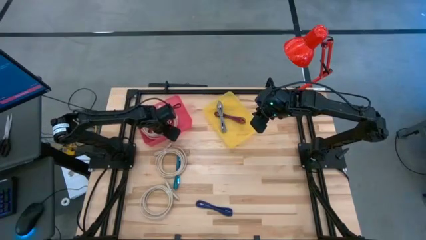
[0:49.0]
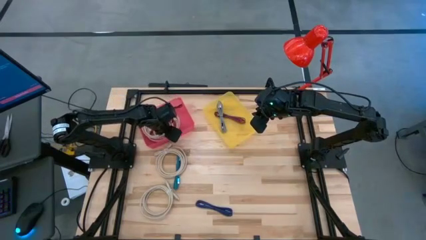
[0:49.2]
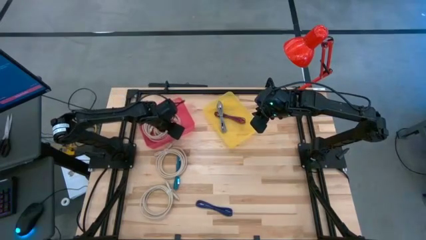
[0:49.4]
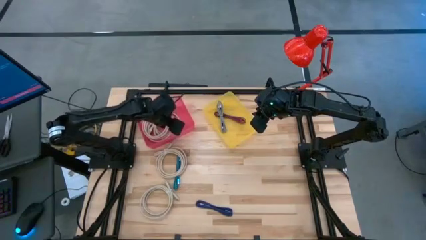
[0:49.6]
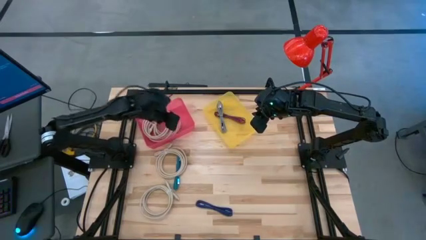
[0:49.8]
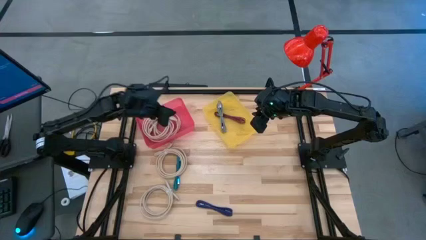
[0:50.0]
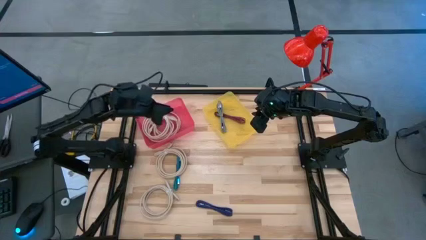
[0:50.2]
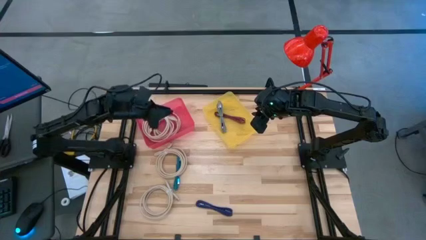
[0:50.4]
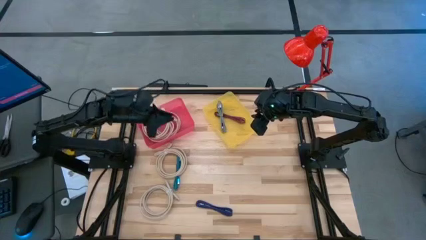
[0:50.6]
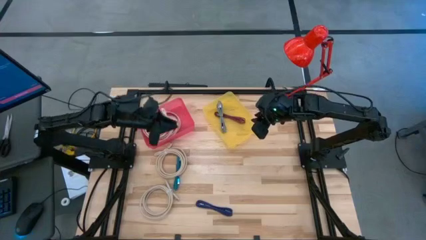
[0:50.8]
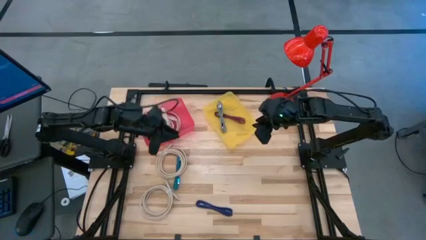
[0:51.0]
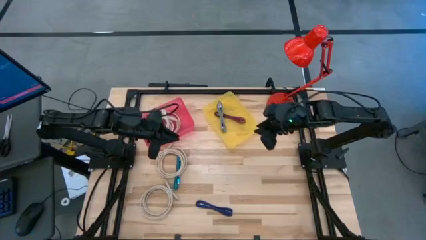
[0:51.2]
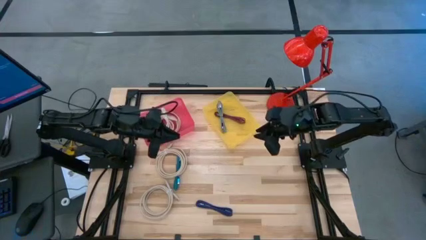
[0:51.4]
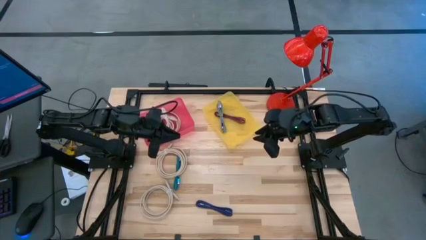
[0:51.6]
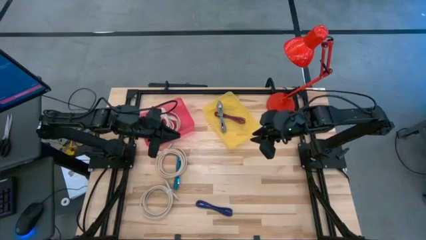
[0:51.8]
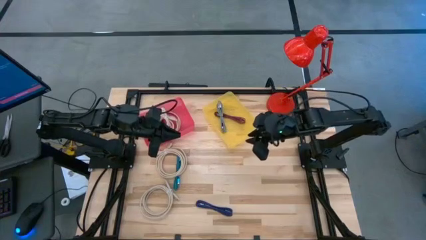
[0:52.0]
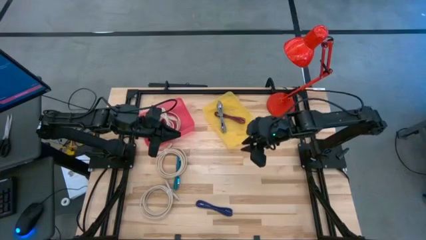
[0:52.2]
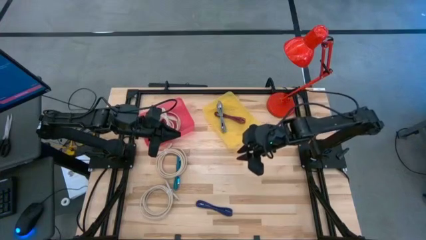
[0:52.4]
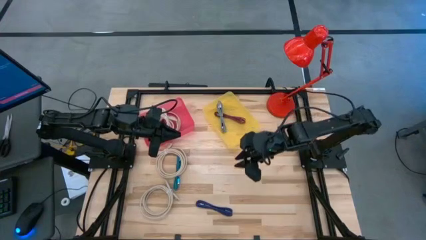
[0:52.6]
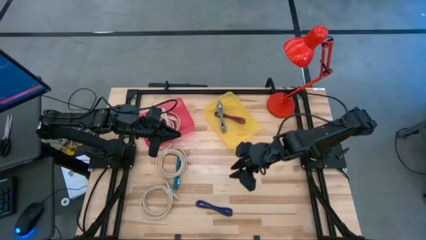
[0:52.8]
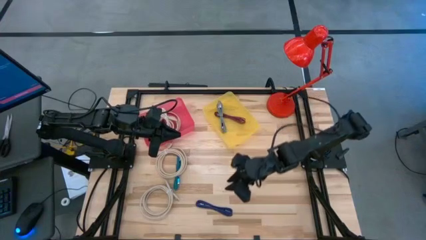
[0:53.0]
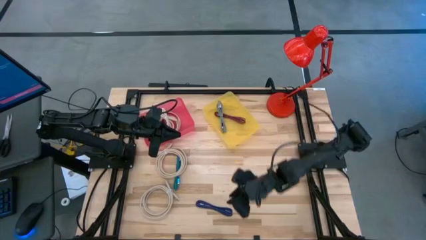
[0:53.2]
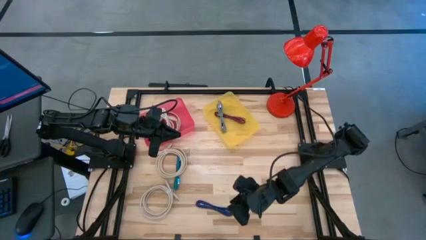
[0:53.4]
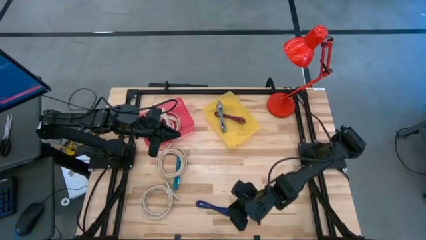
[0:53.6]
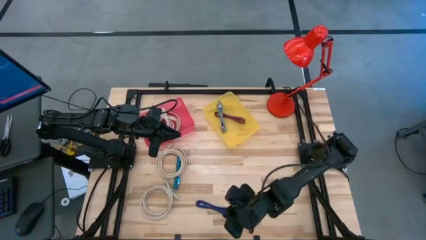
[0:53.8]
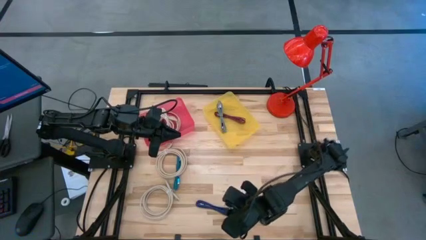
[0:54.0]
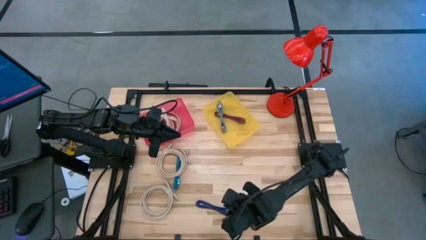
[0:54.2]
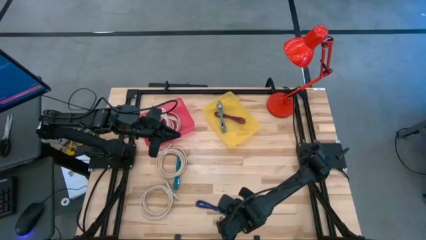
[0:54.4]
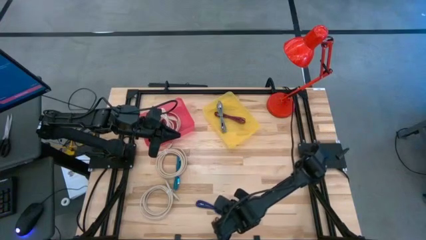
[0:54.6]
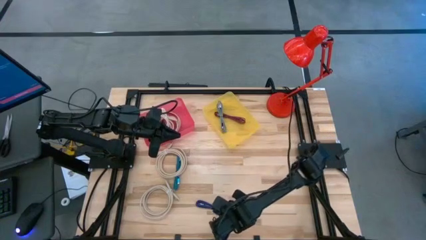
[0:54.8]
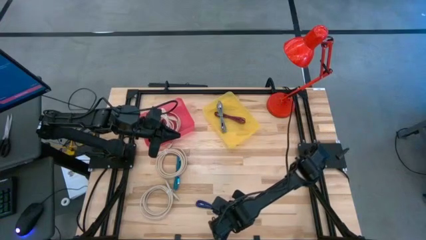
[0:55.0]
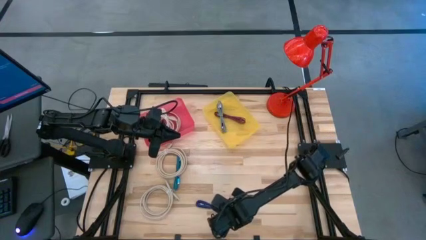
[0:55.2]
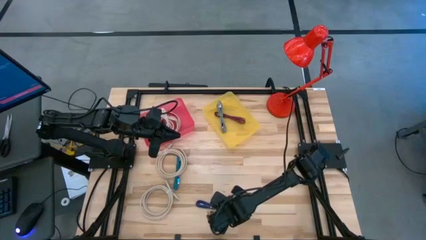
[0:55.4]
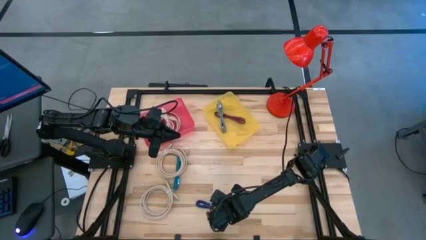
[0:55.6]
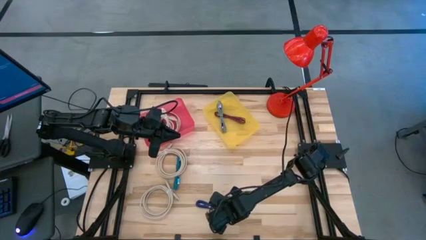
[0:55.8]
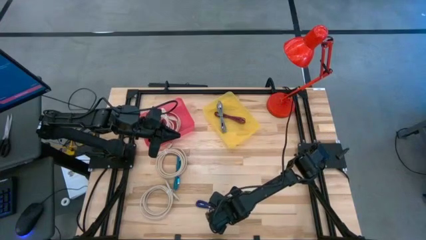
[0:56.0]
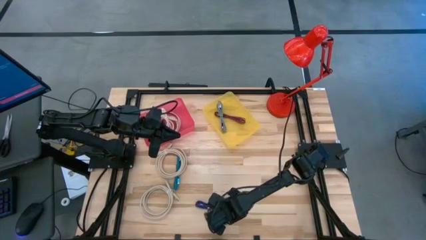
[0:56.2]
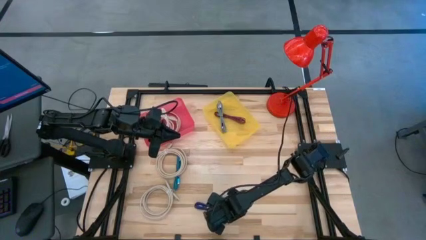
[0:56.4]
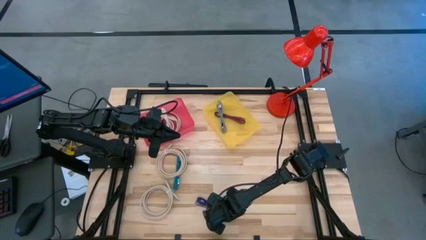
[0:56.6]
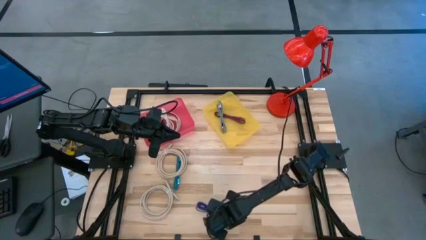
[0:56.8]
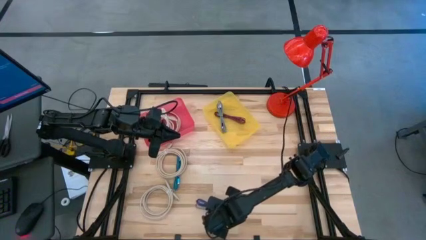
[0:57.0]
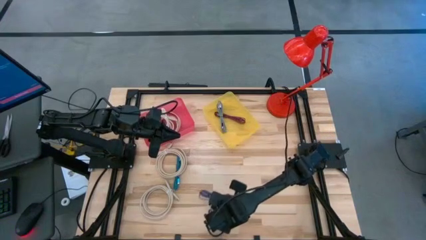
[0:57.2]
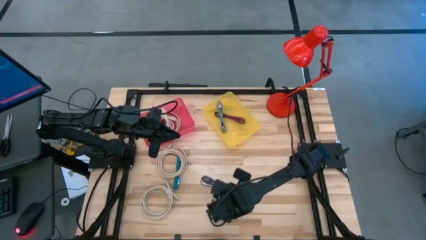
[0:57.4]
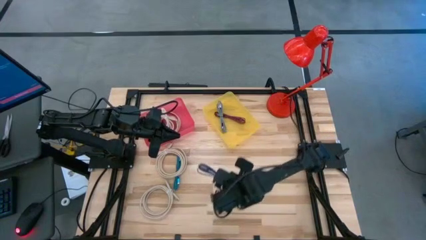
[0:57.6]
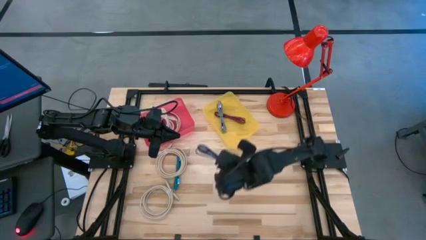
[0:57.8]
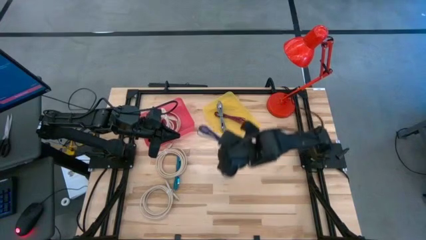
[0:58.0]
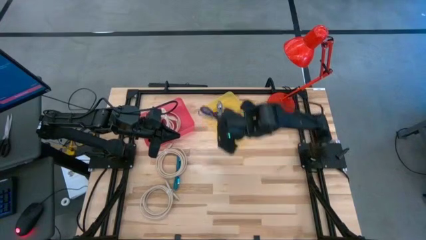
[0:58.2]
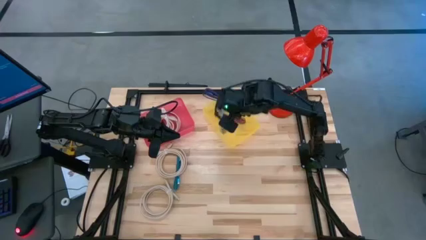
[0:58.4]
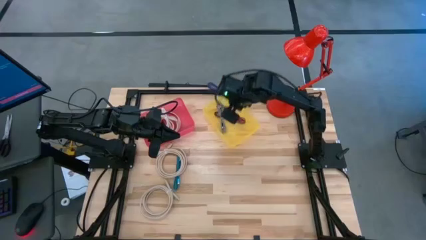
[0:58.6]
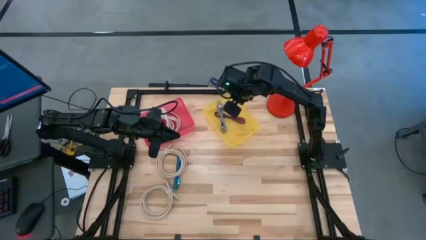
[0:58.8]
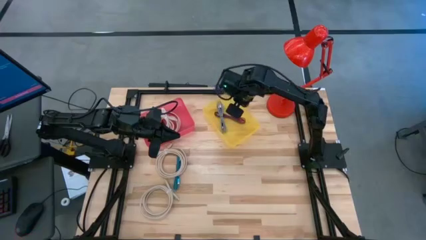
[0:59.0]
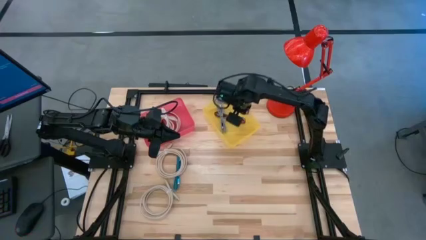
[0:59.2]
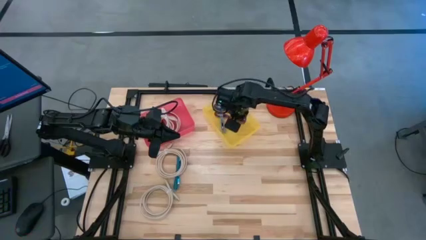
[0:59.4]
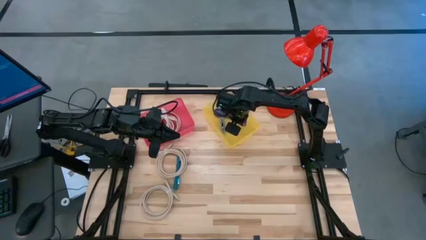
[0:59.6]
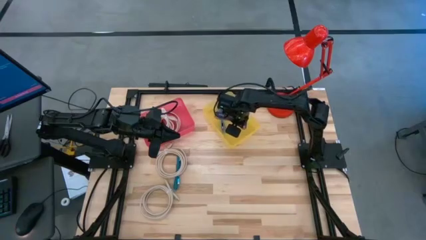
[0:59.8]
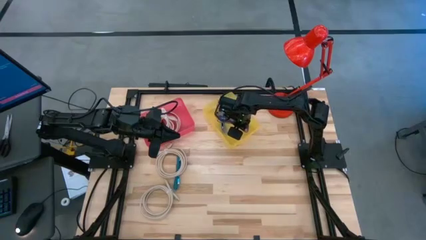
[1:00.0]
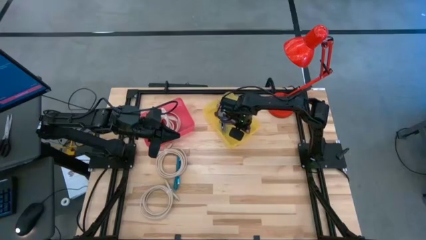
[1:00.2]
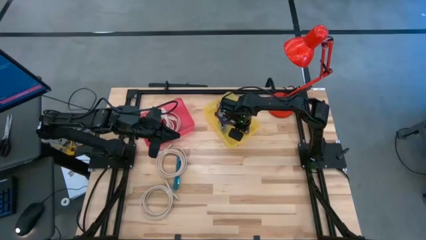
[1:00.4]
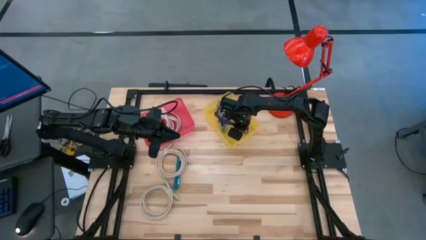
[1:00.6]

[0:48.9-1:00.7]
Task: Pick & Place USB Port
Put the blue charger cable into the yellow transparent bin

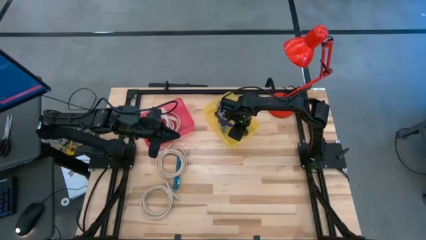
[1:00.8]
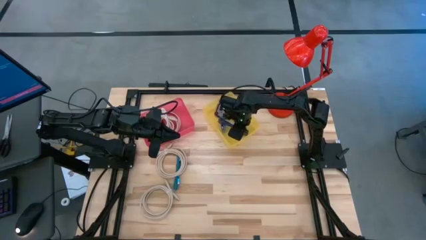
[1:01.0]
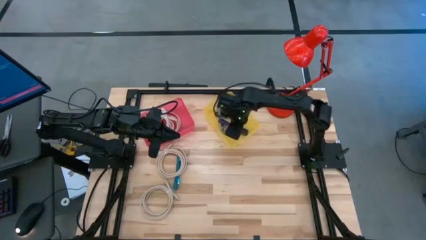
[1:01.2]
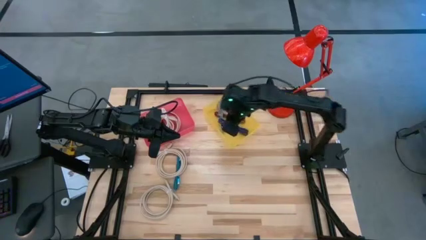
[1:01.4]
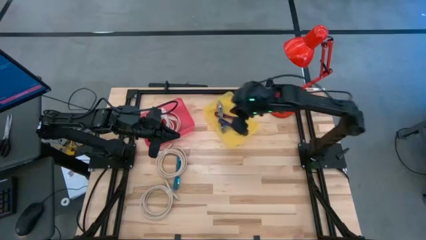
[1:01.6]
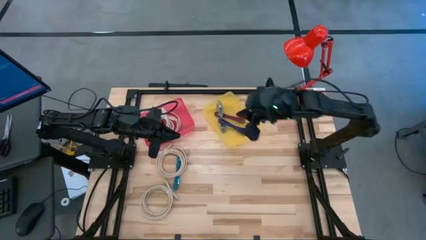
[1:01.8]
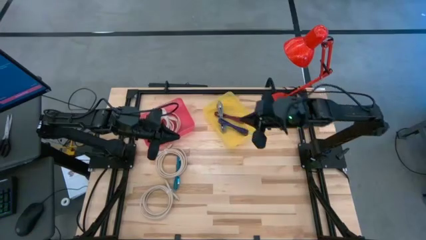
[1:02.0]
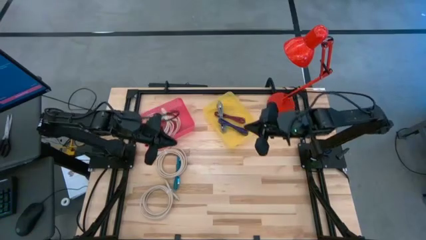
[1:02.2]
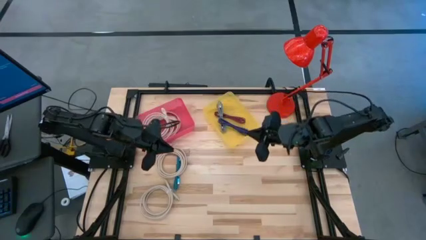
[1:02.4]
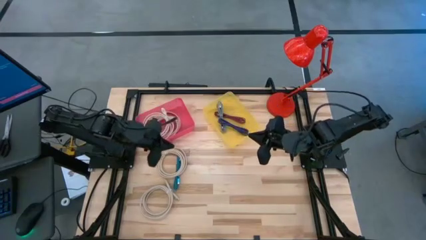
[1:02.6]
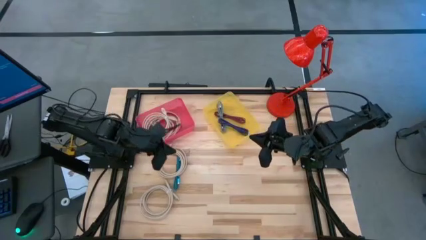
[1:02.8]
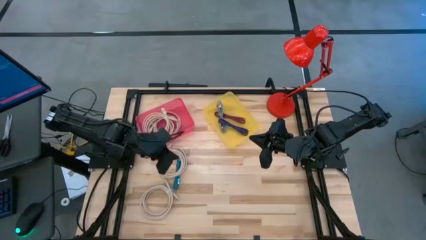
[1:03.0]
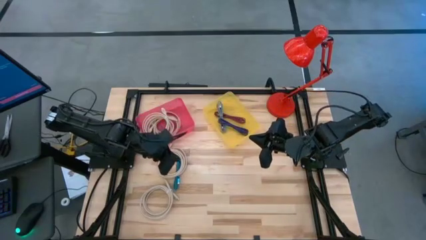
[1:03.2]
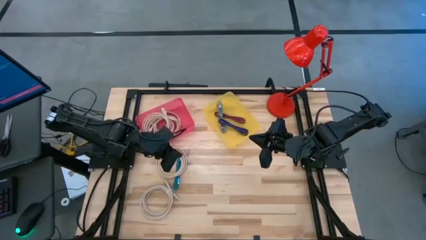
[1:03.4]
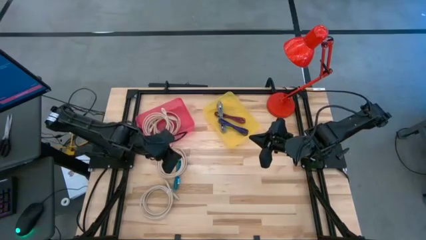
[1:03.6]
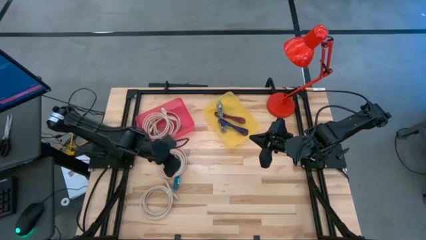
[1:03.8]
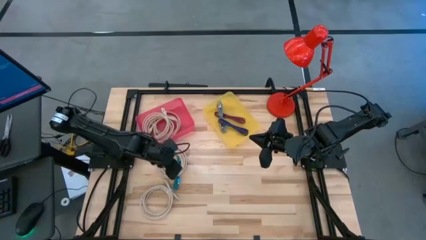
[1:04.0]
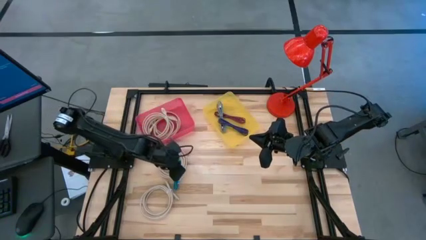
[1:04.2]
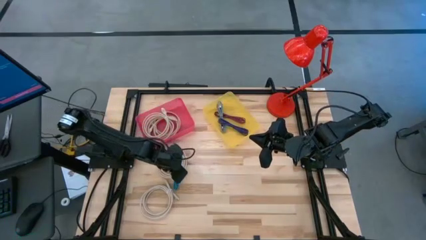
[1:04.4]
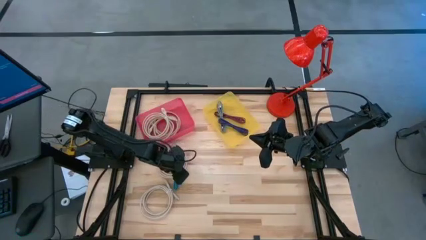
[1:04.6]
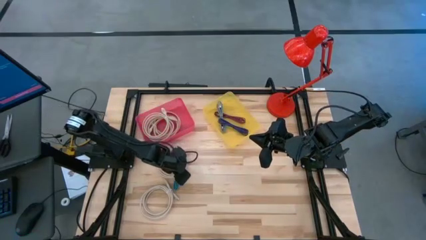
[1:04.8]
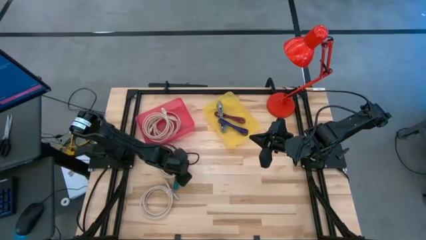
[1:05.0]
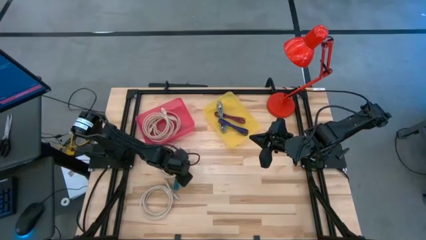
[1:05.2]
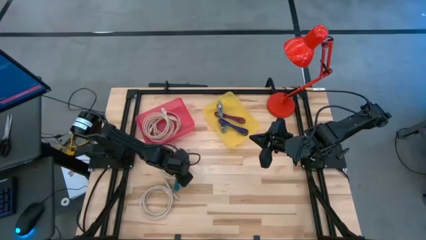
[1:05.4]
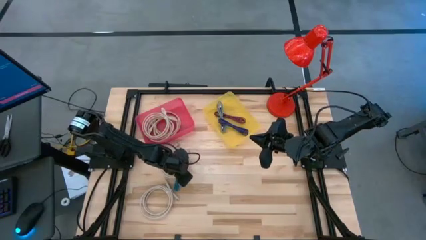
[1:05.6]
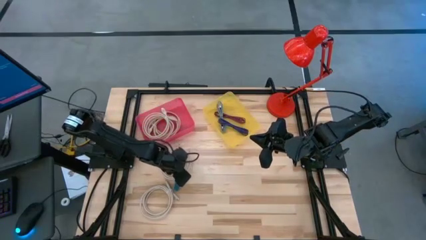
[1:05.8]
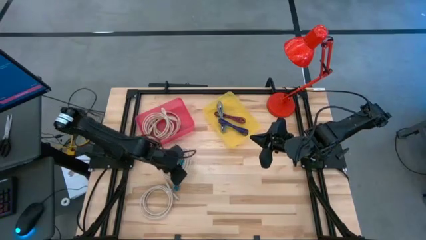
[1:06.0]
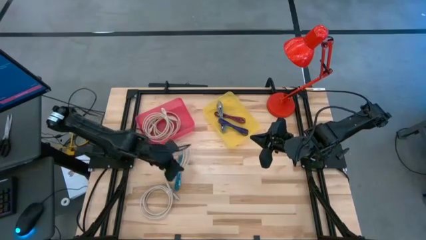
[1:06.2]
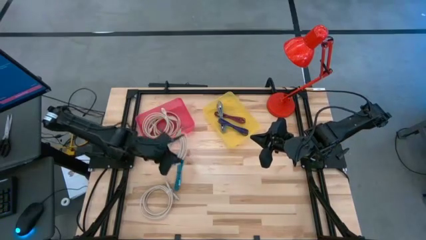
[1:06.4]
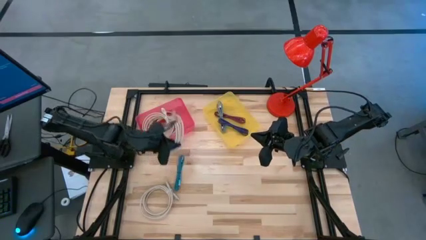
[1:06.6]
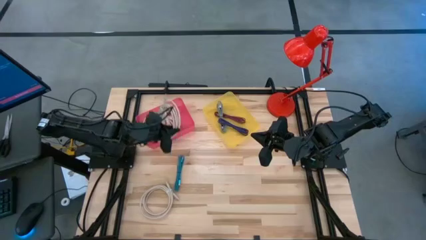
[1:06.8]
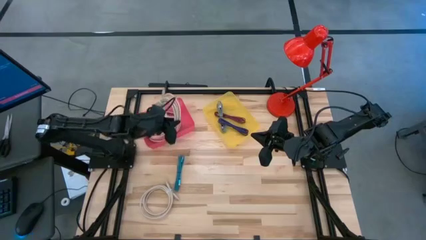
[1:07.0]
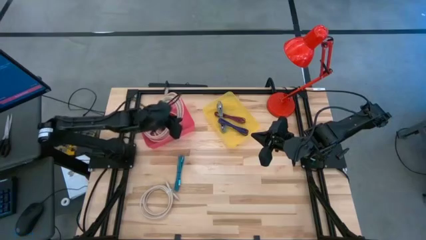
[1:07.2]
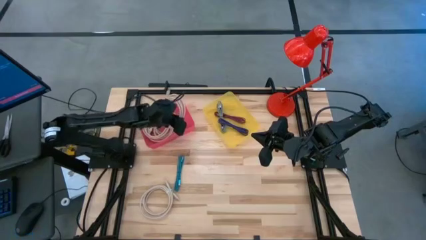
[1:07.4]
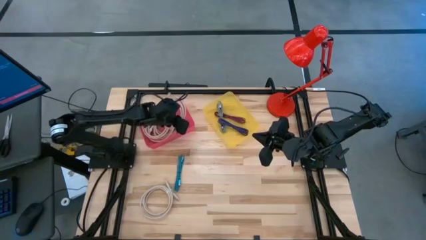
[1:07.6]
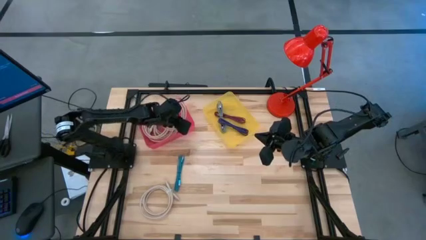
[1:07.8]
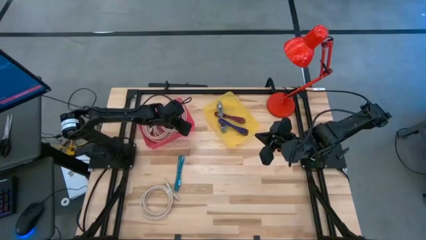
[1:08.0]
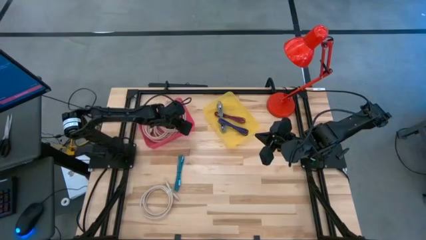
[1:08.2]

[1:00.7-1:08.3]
Put the white HDMI cable into the pink transparent bin
